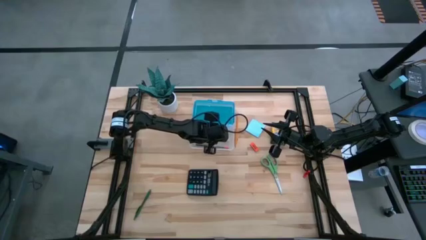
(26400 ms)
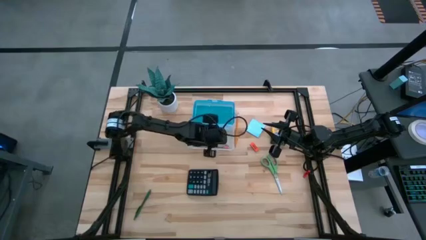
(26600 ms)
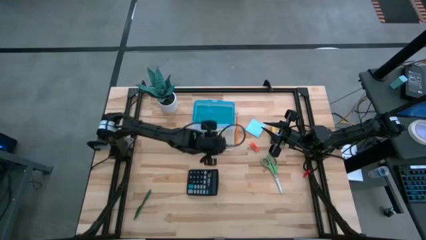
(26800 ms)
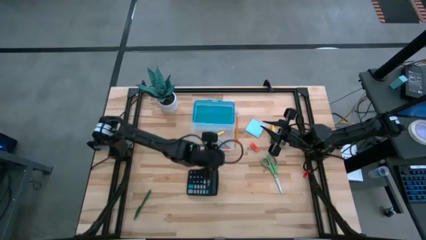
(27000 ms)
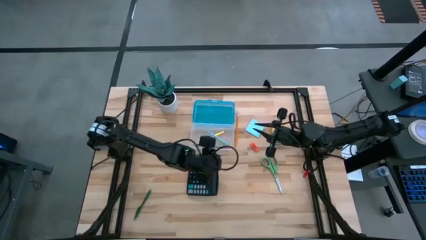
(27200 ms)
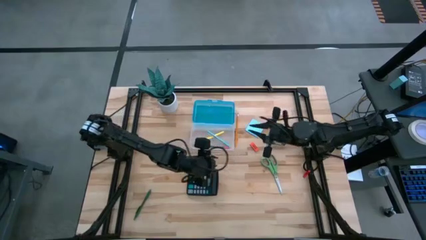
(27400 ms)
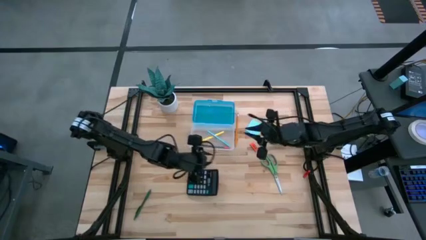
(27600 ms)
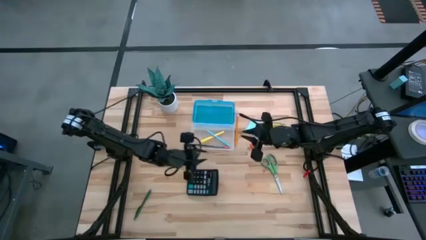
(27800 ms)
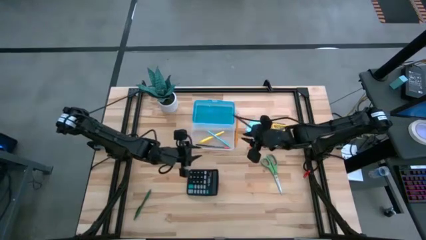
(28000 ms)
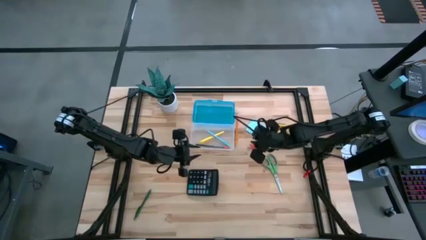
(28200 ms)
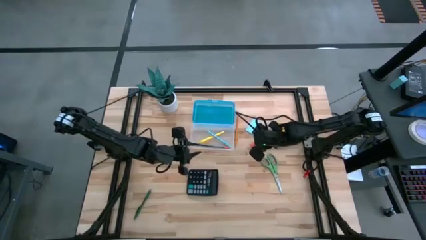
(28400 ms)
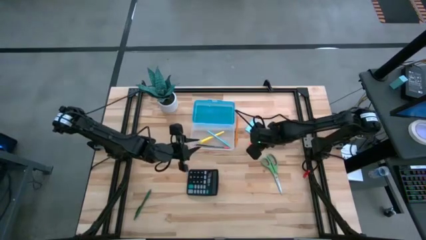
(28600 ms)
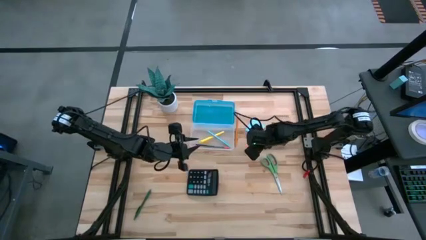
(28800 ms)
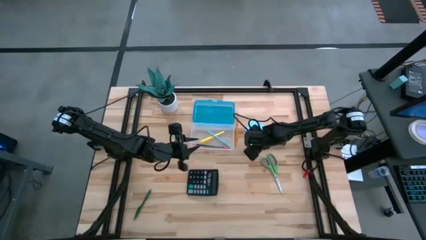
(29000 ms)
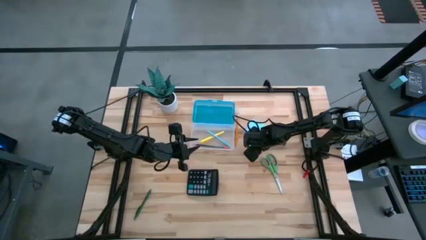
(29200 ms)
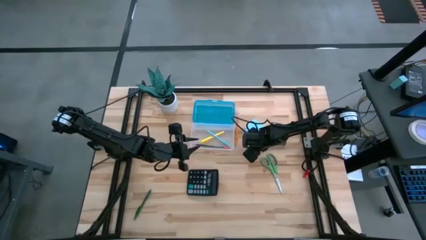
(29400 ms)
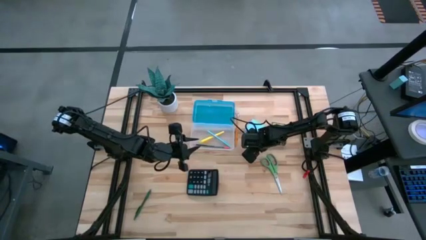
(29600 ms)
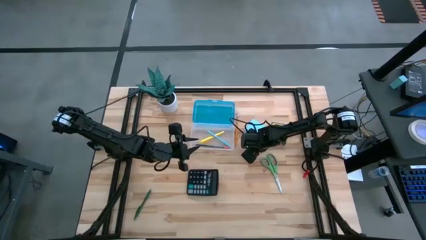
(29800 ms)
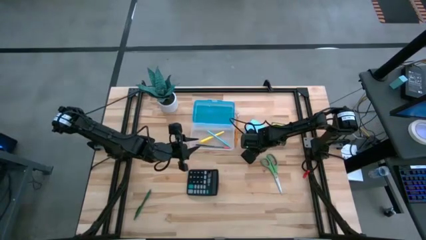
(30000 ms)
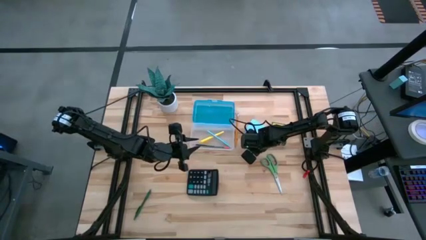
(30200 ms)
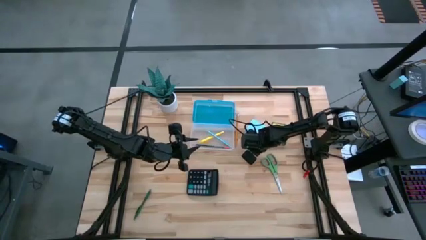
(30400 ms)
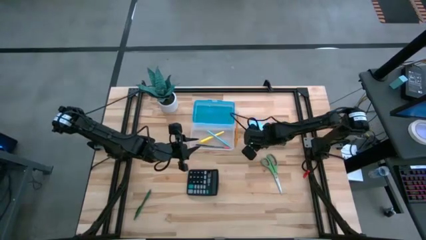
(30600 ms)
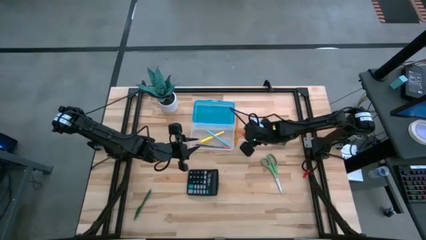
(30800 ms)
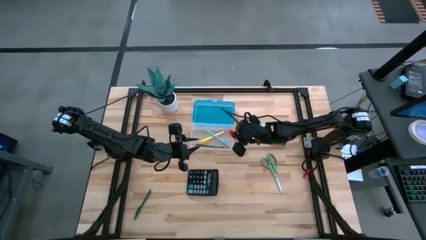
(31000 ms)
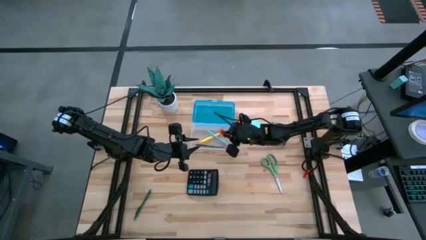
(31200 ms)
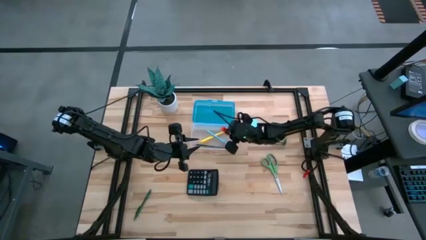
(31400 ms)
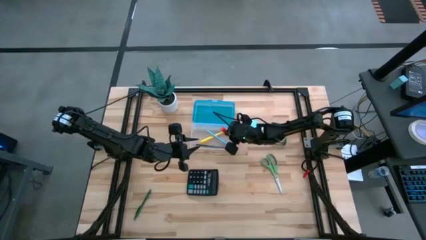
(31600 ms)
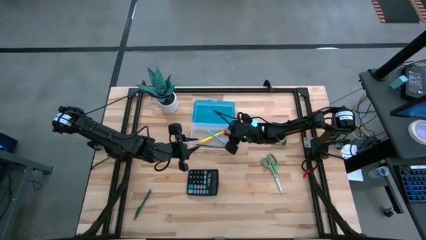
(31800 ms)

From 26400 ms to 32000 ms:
Task: Pack school essentials
Put the orange eraser into the supply box

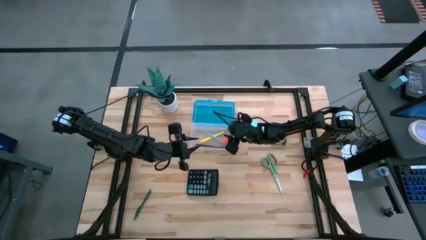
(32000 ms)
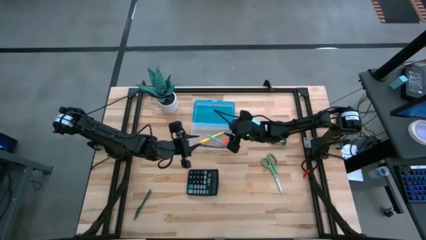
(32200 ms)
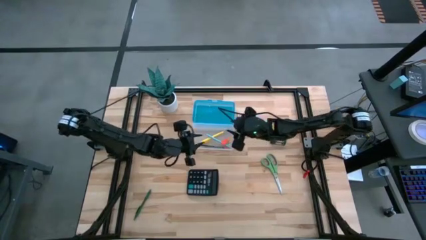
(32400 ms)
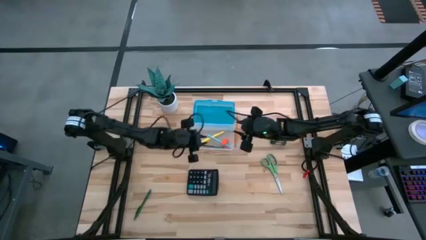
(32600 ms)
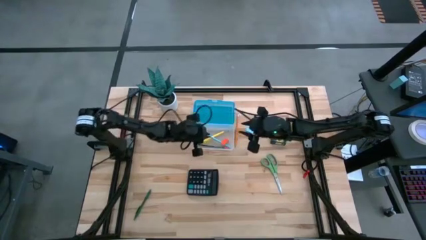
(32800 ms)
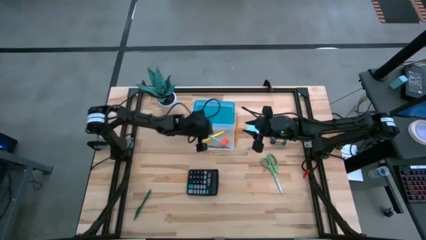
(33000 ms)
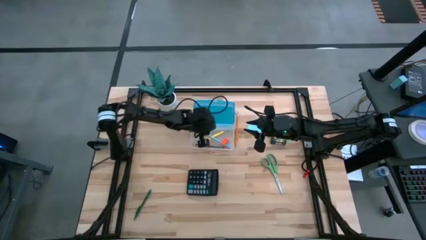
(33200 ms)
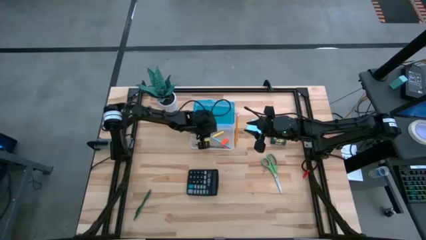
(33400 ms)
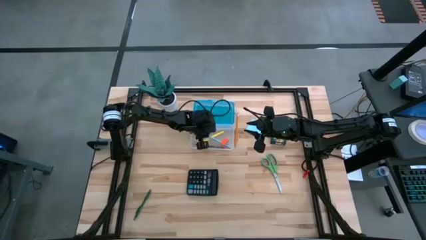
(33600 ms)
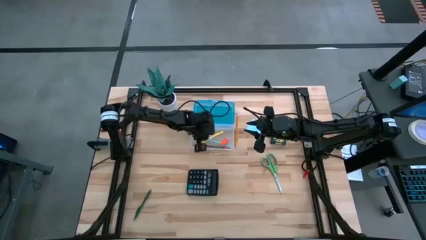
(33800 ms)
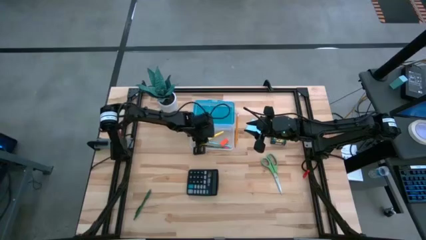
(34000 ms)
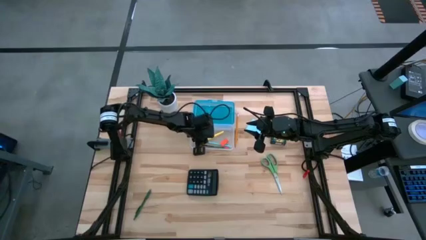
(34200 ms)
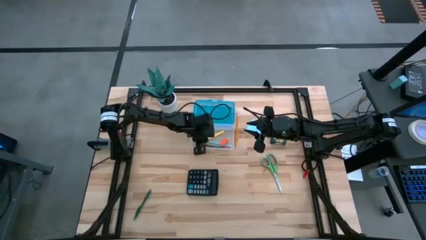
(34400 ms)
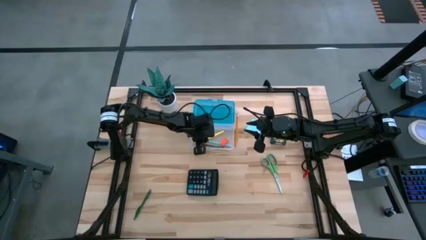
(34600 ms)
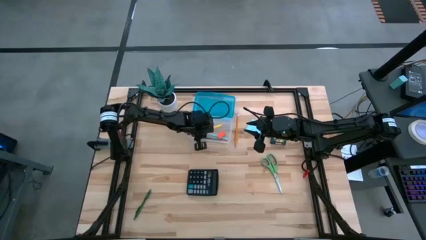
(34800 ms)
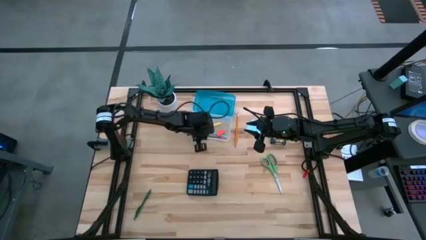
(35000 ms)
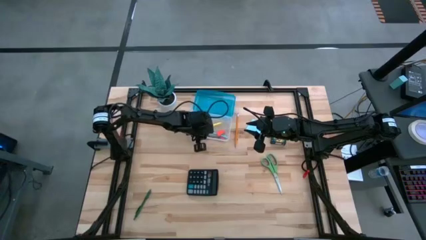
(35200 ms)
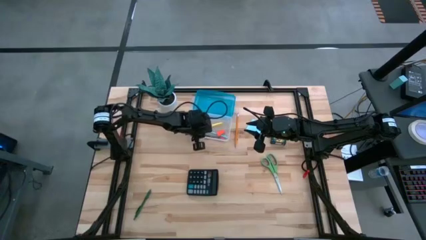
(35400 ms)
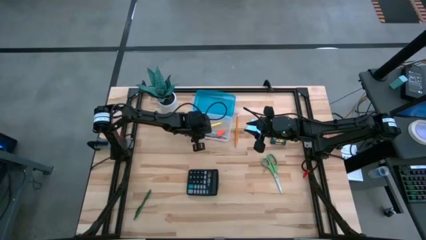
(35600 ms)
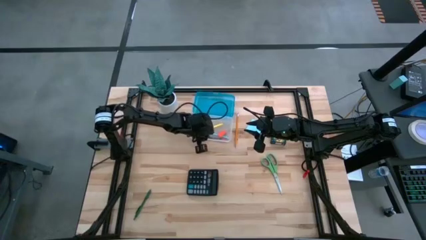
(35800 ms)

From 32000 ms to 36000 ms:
Adjust the light blue pen in the supply box

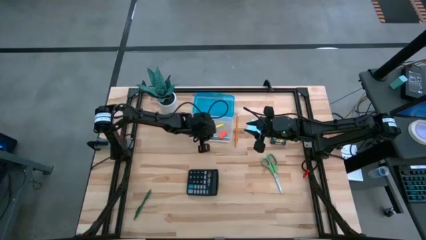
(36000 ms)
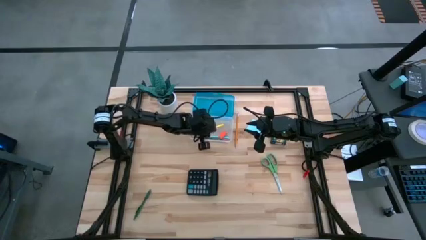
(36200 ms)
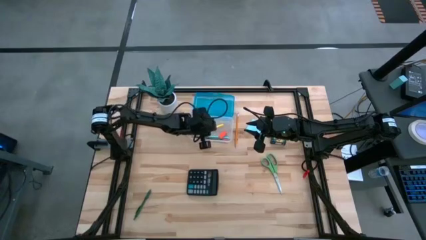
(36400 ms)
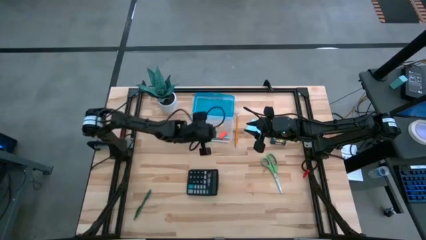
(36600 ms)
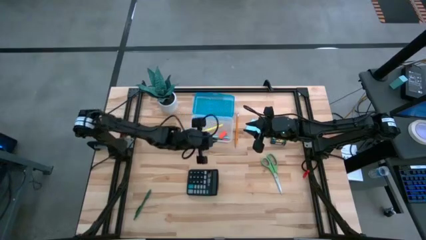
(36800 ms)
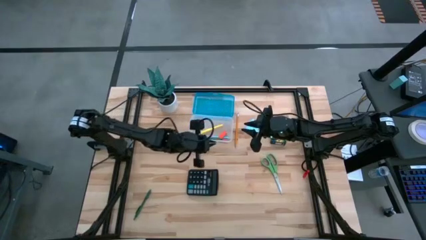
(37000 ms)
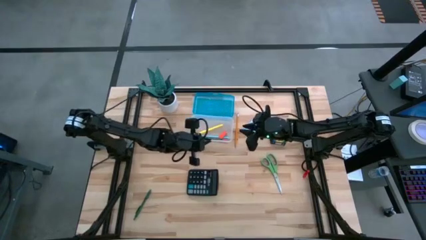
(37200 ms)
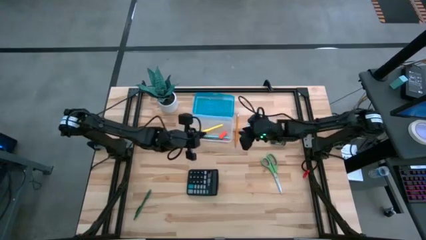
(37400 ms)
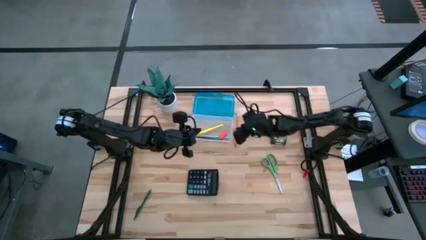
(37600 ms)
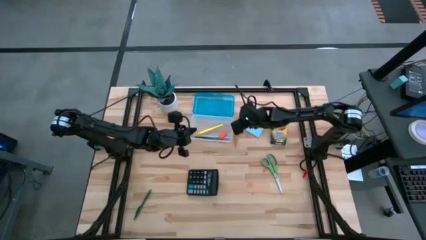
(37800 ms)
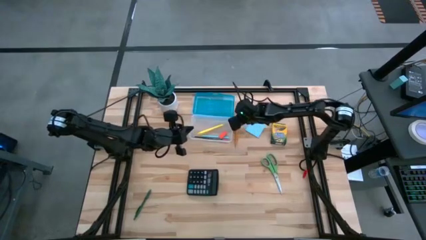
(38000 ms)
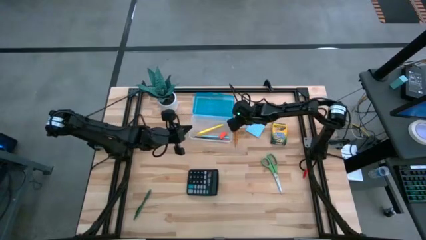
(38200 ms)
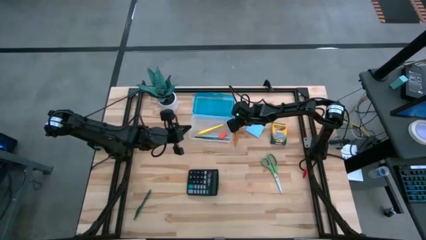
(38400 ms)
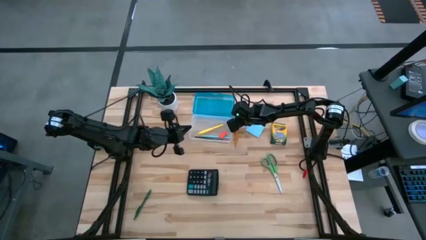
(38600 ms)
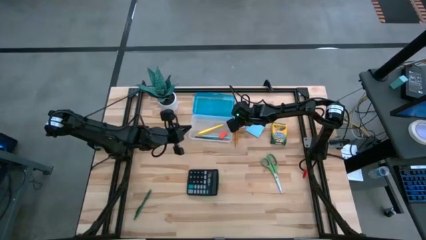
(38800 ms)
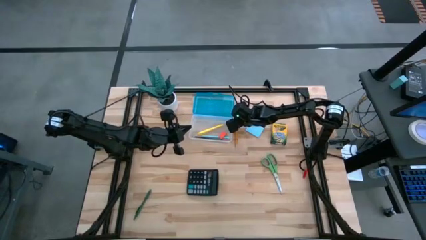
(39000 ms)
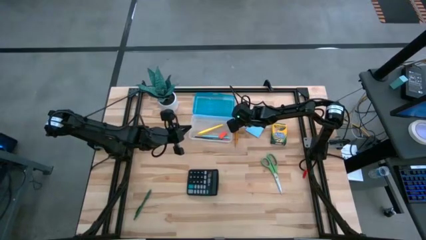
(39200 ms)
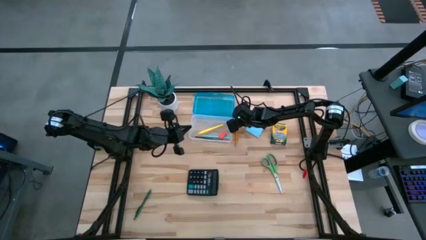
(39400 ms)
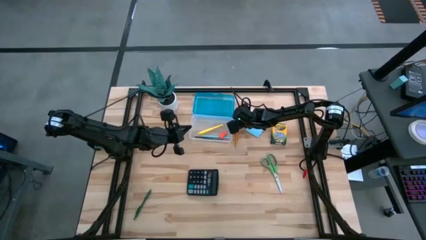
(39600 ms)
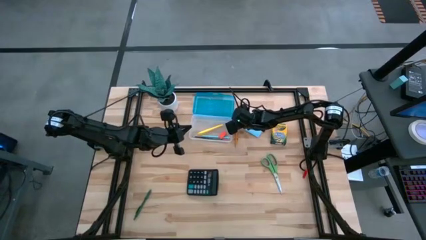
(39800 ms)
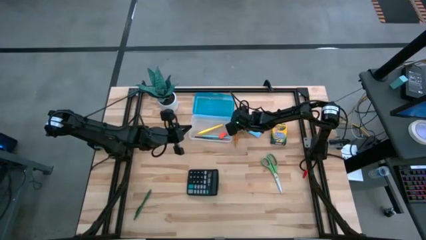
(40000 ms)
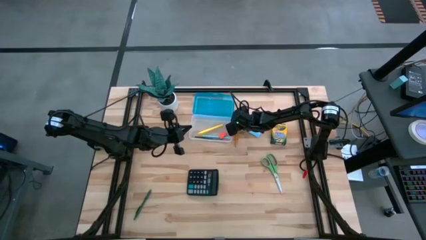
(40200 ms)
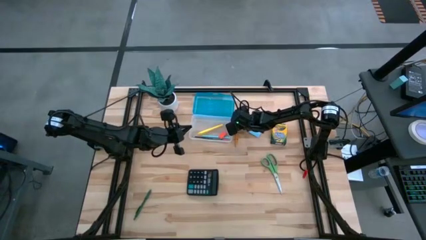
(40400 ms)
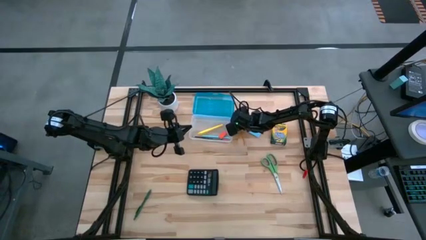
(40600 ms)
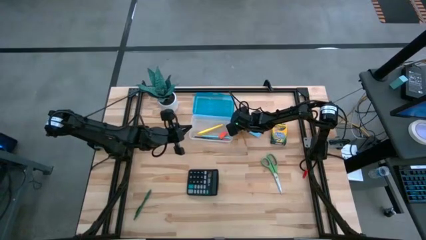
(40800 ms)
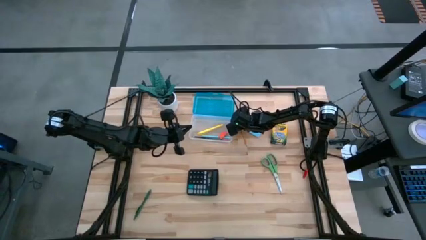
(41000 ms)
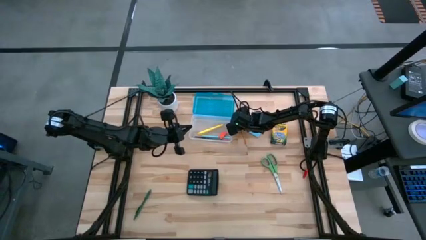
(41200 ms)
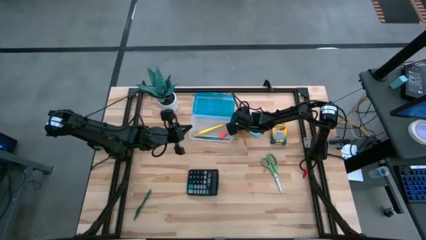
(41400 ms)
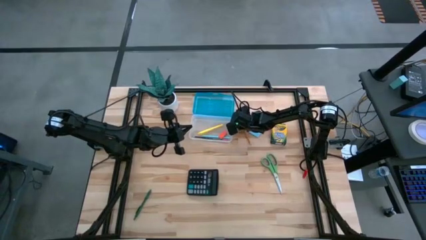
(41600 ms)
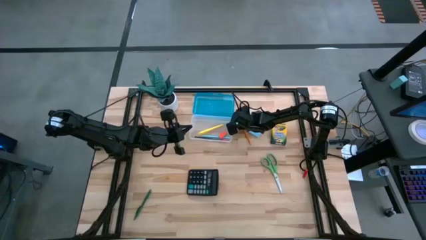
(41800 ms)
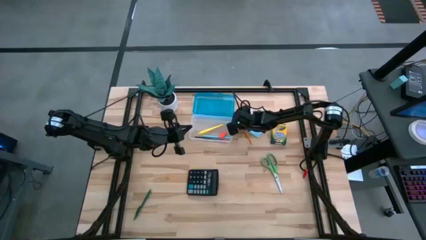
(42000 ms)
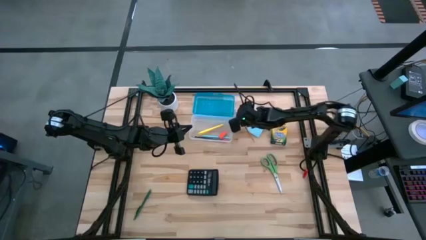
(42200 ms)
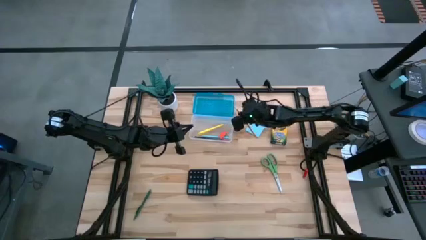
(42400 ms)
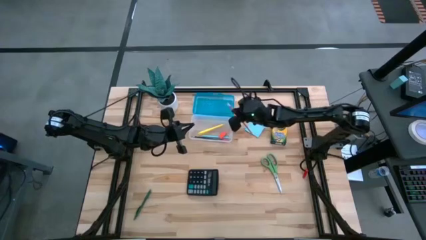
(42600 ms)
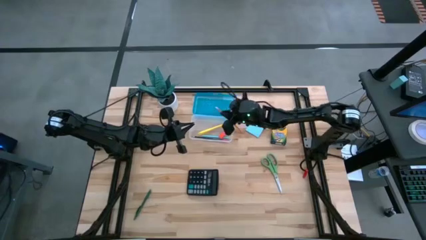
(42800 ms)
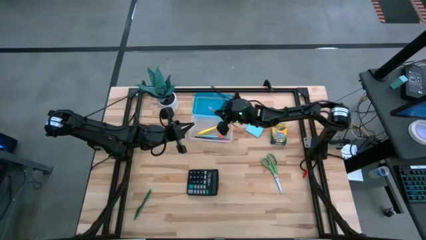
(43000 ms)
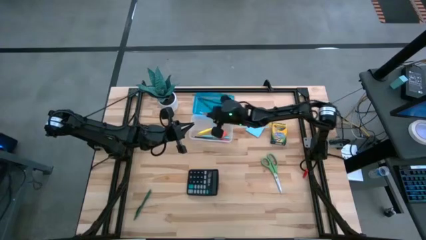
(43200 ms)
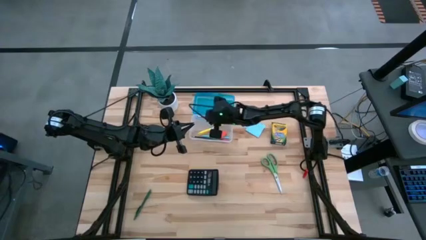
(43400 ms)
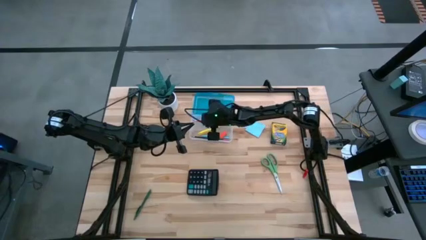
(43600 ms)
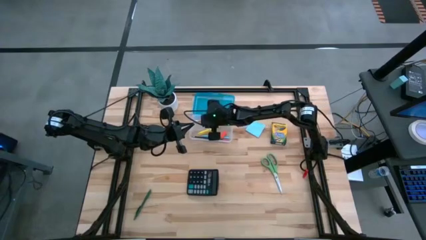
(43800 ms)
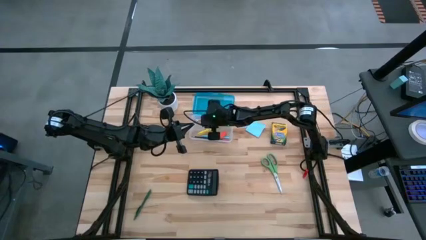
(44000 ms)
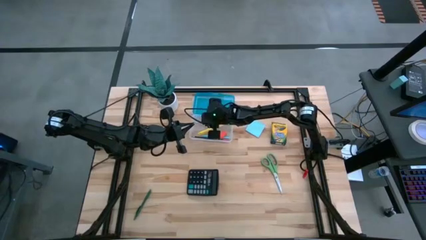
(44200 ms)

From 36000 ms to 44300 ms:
Put the orange pencil into the supply box
